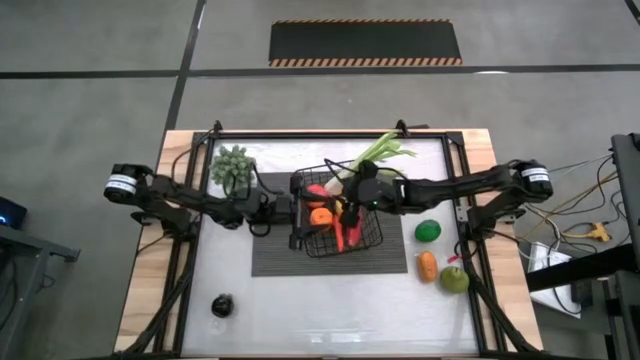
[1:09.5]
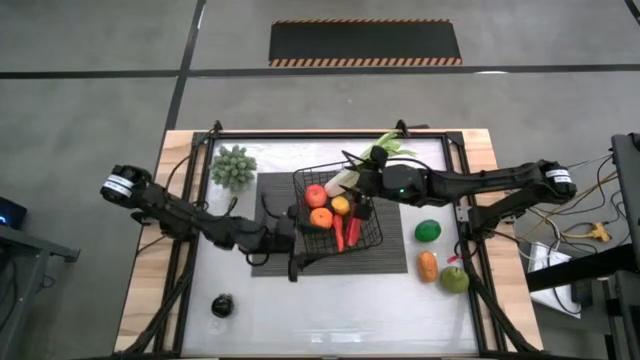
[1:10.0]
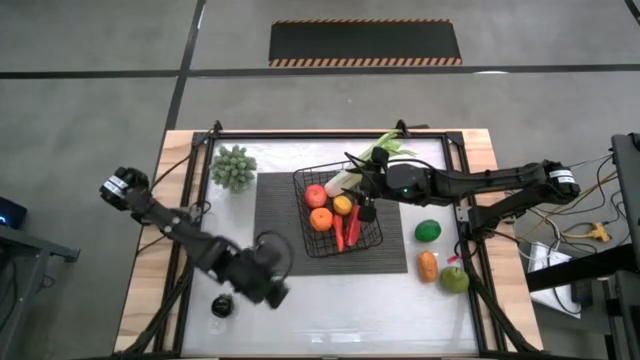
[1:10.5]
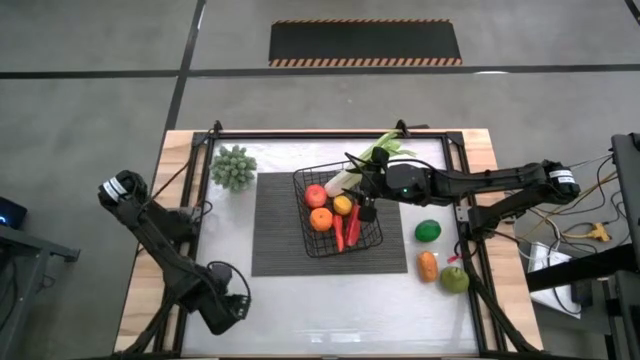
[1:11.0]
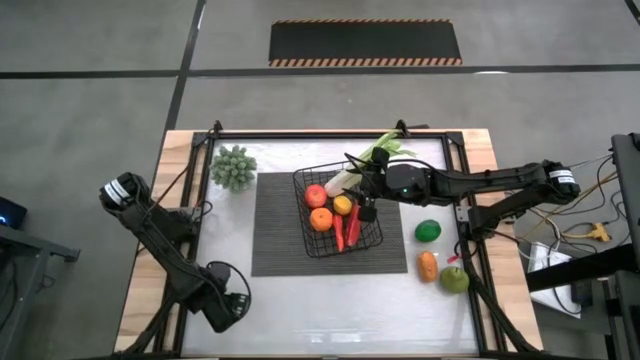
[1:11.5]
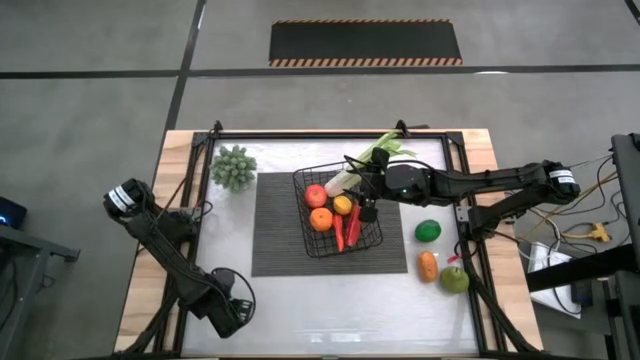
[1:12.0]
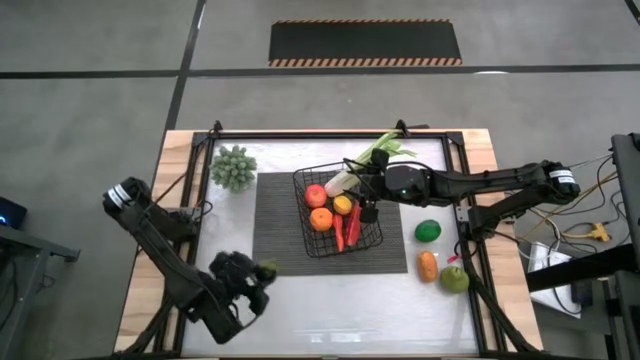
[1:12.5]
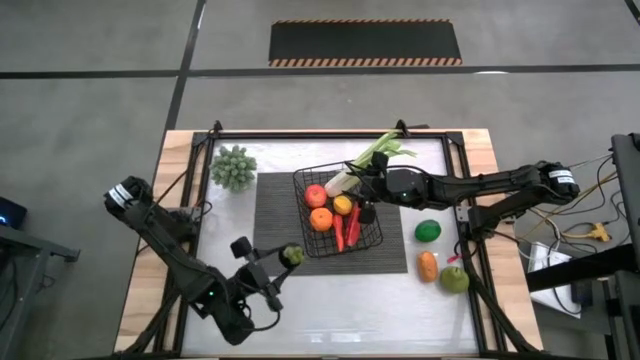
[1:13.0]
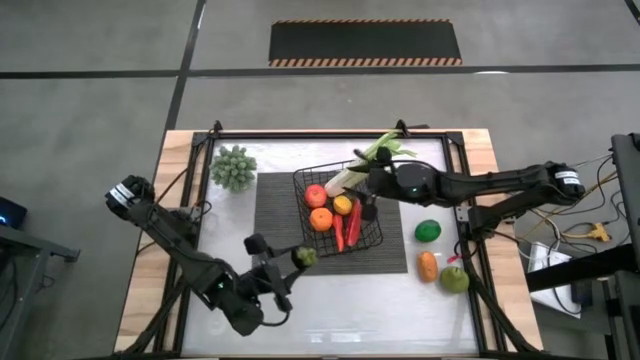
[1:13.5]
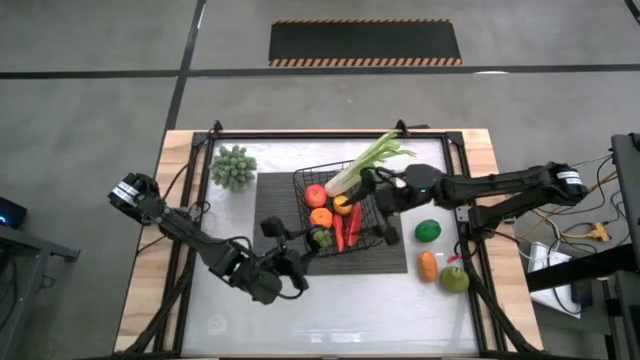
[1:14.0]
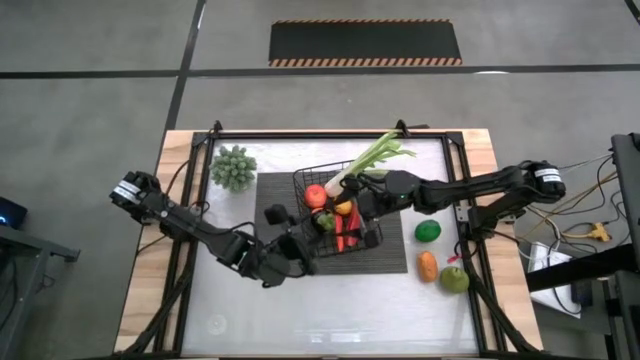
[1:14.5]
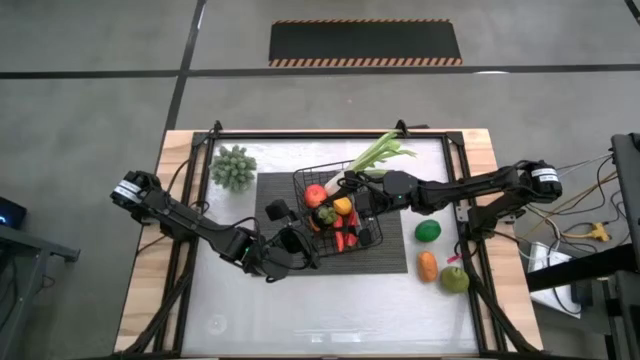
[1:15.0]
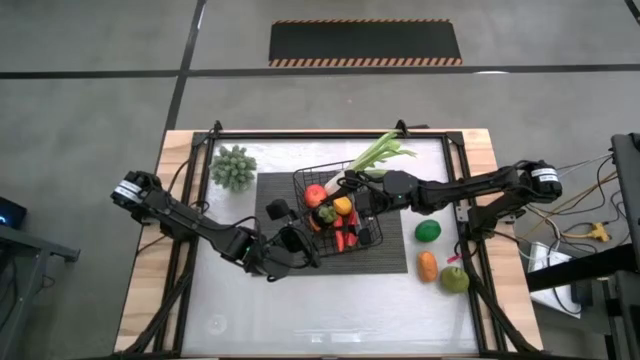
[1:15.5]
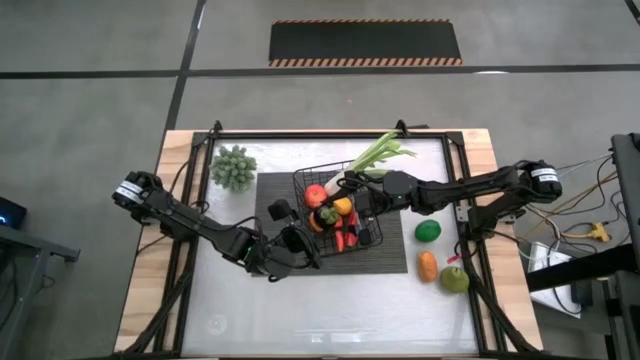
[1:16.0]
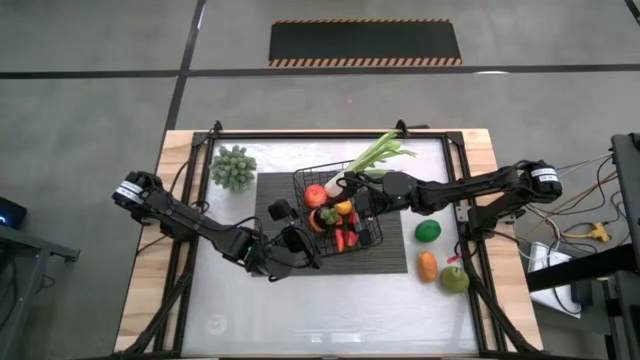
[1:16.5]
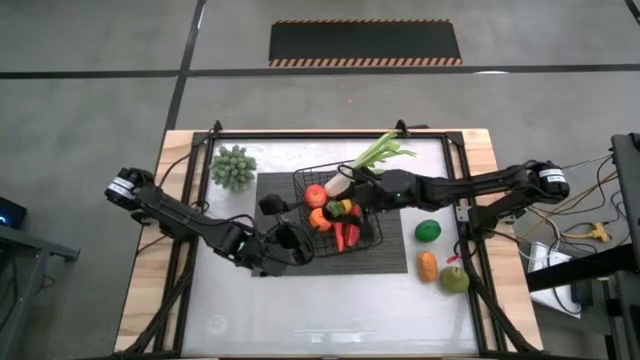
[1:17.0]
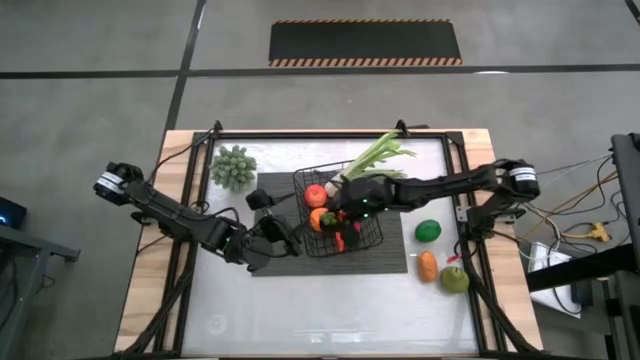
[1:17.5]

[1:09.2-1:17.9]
Task: Build produce basket
Put the mangosteen into the wire basket

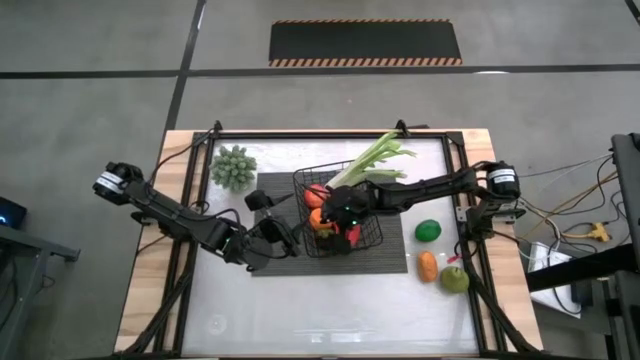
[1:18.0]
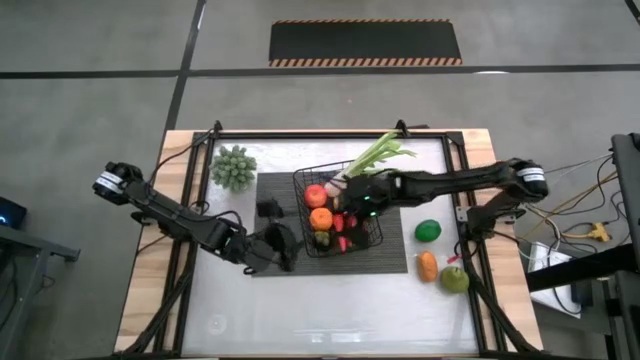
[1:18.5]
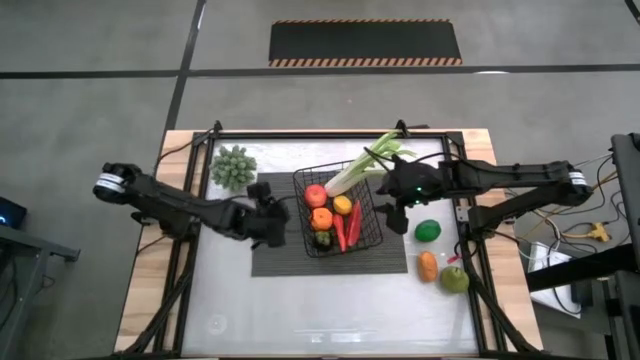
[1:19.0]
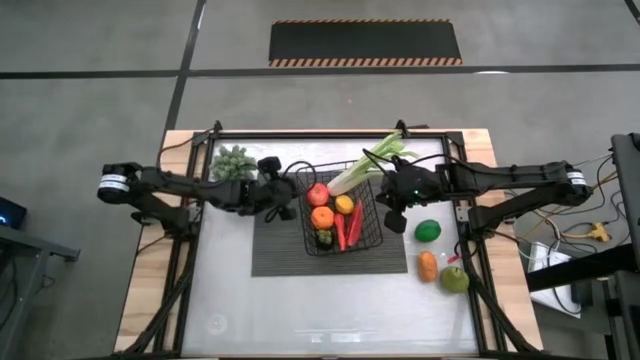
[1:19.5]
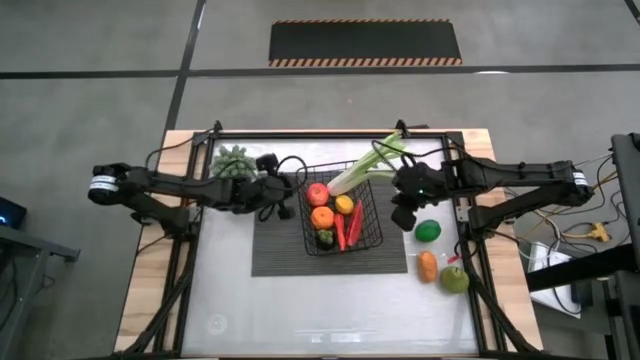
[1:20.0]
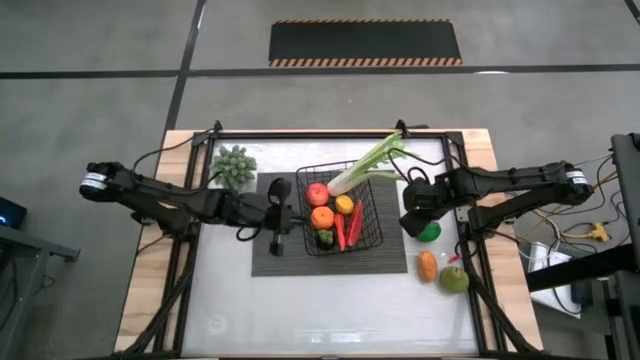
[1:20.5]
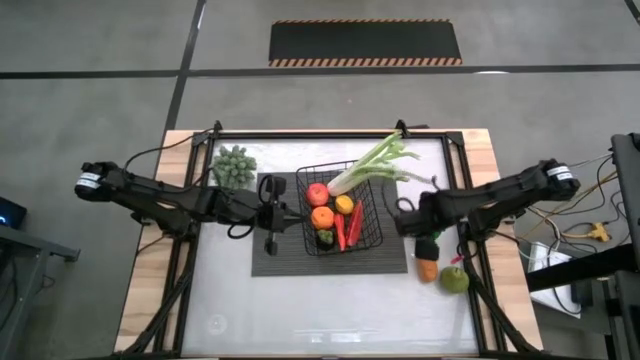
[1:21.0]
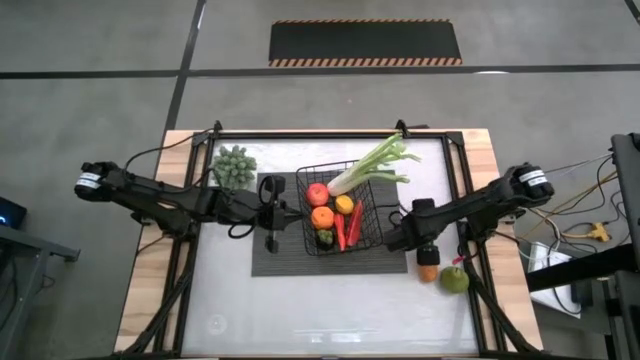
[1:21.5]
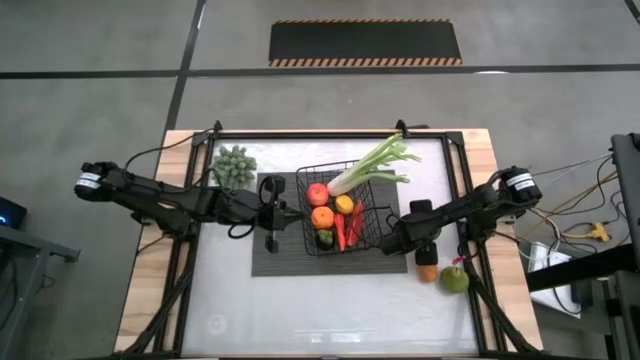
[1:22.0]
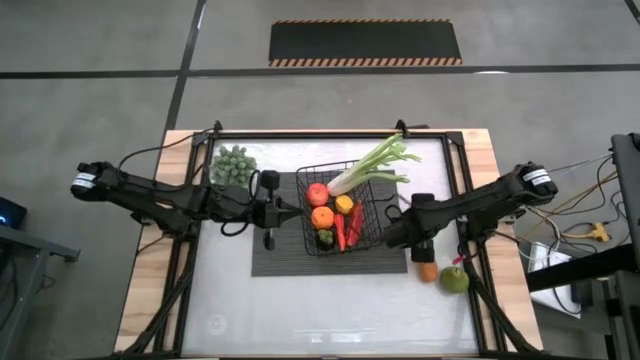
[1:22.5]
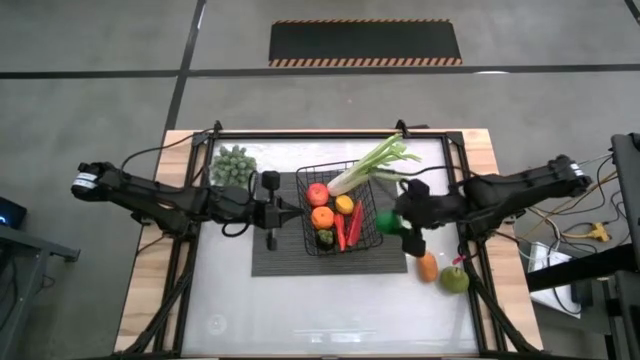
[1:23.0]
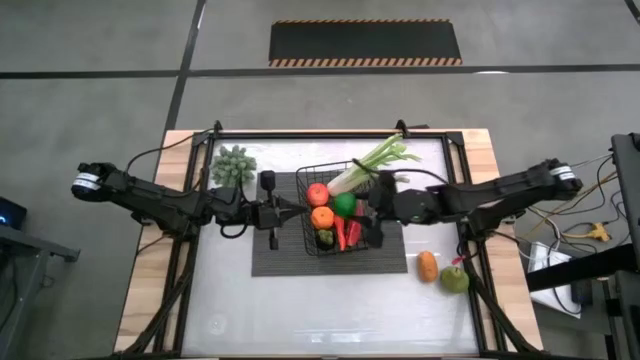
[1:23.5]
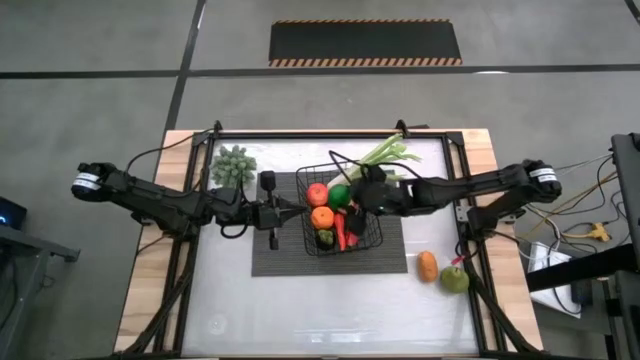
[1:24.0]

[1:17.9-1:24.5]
Put the lime into the wire basket

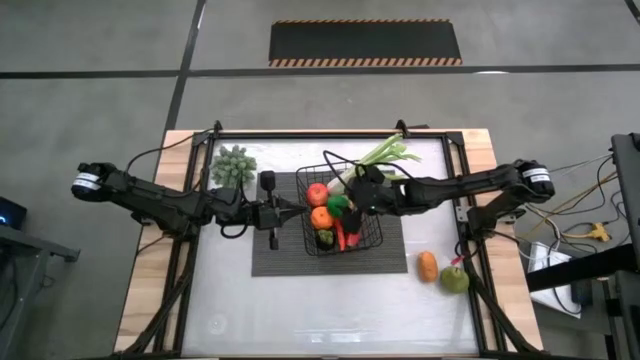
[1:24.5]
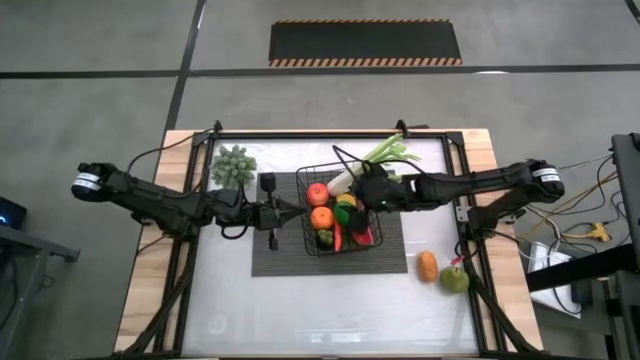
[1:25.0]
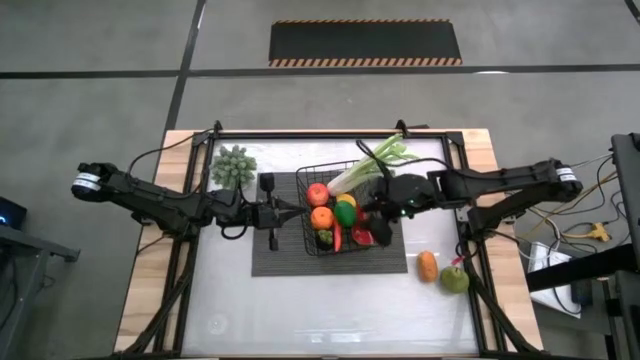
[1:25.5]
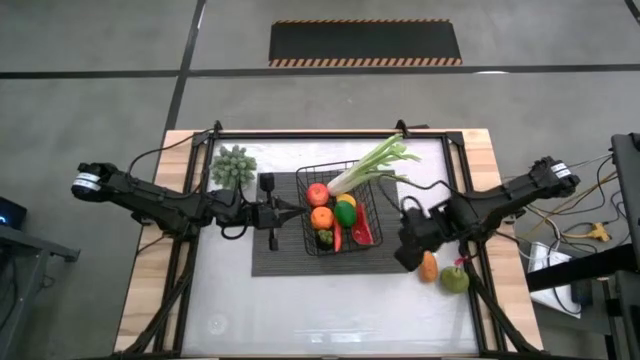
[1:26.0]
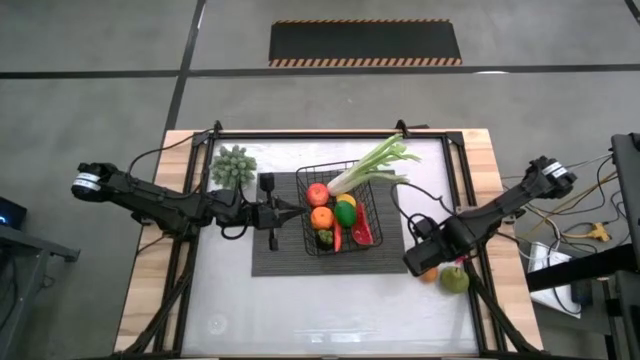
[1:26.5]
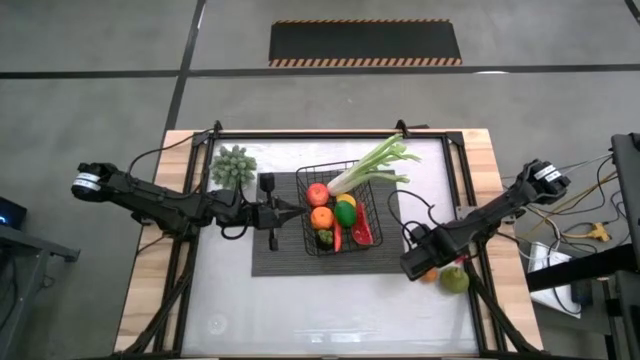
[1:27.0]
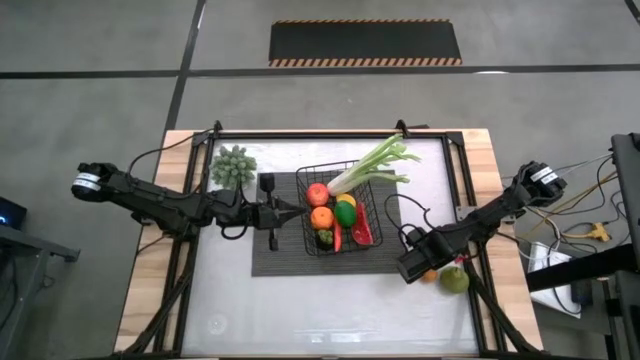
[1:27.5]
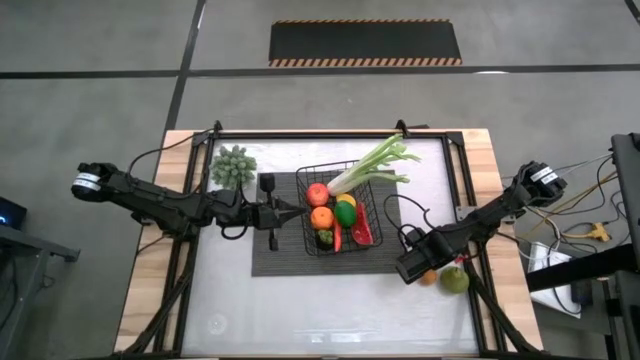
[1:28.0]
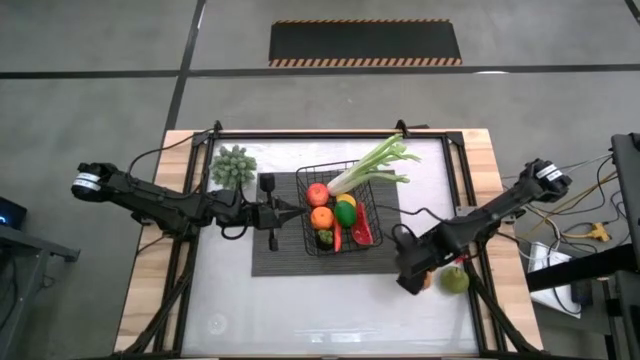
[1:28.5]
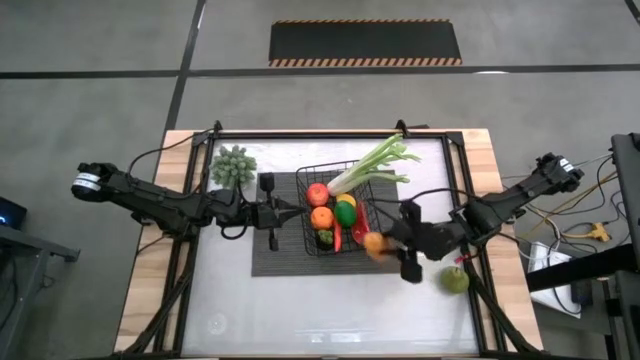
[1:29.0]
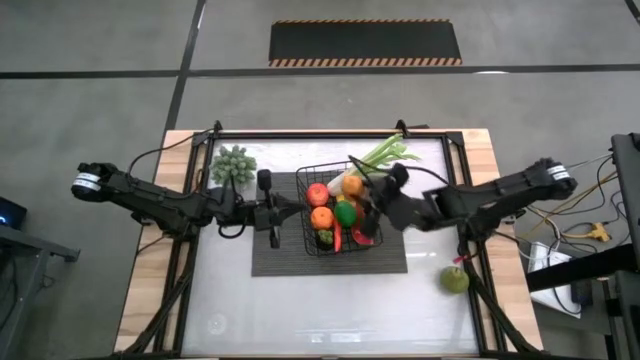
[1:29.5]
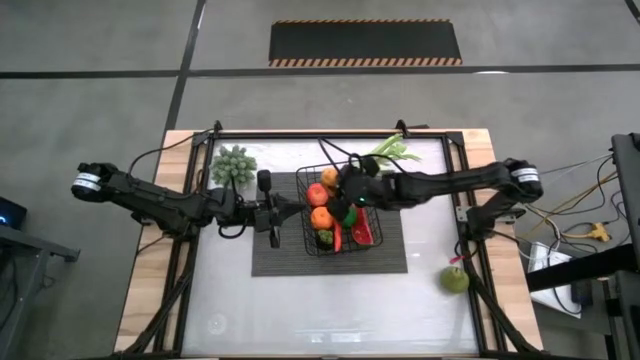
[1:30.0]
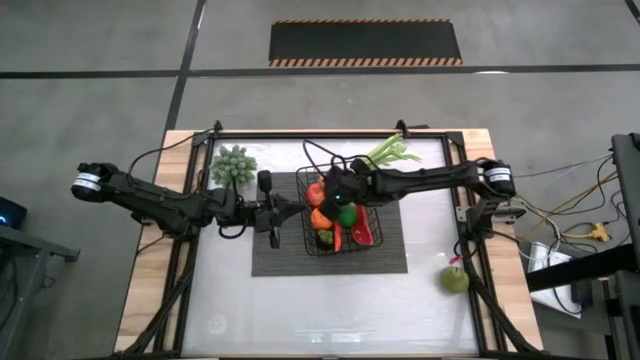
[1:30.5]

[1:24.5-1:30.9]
Put the potato into the wire basket

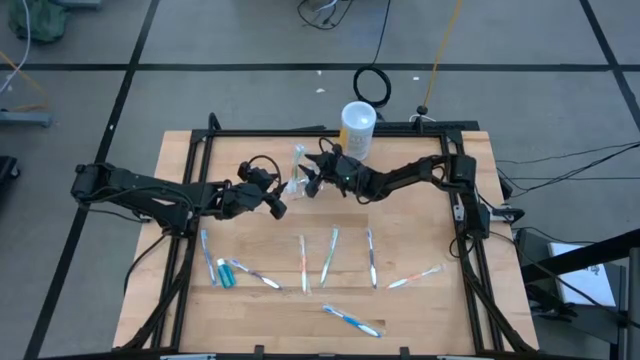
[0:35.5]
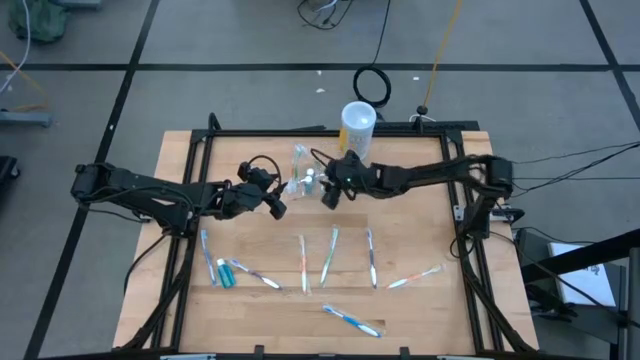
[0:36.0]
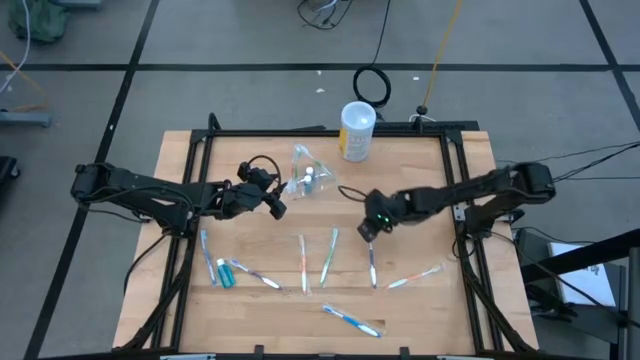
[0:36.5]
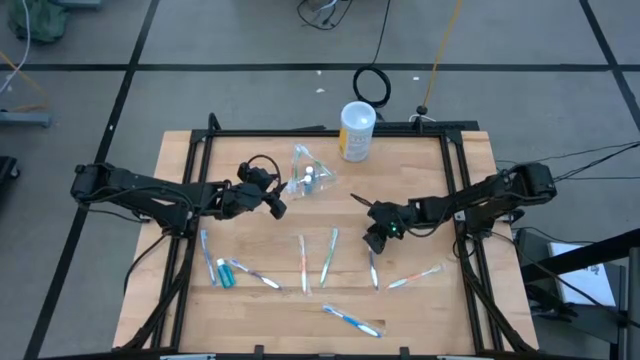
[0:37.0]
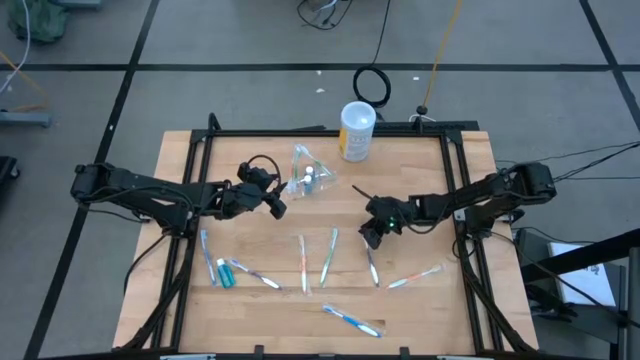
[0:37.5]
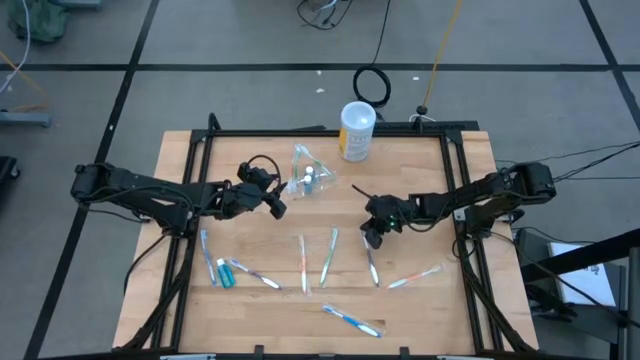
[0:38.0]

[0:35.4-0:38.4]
Task: Pick & Place toothbrushing station
Put the right purple toothbrush into the transparent organizer
